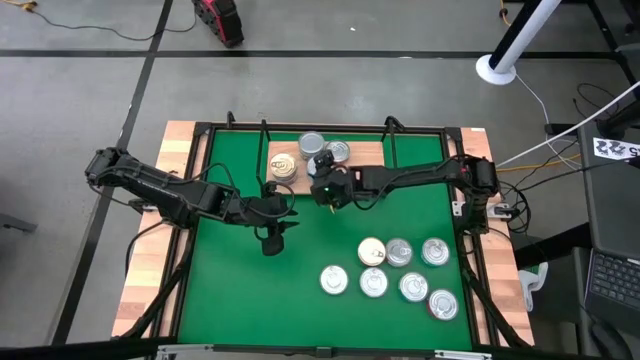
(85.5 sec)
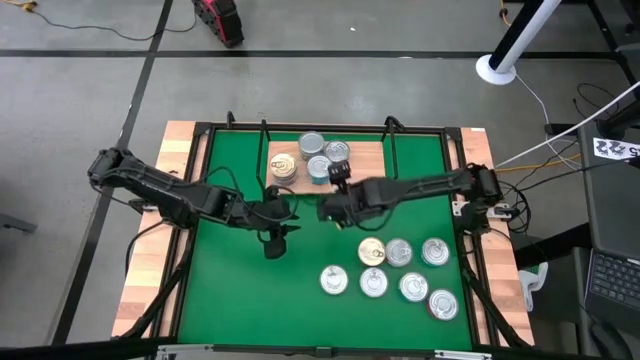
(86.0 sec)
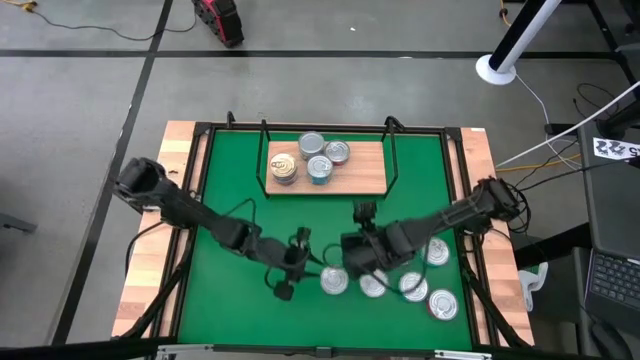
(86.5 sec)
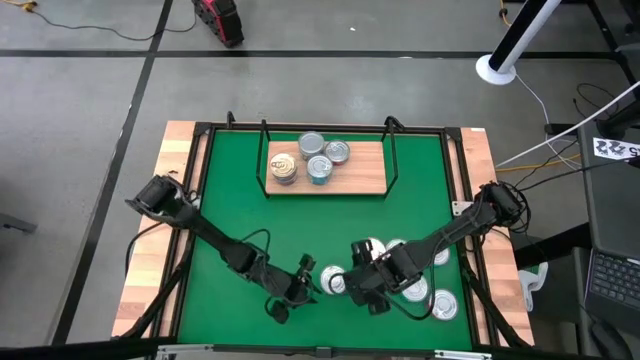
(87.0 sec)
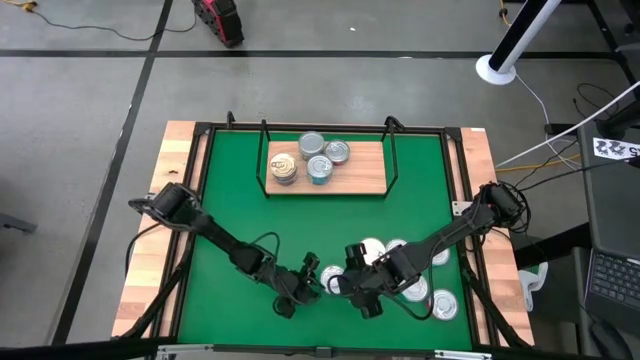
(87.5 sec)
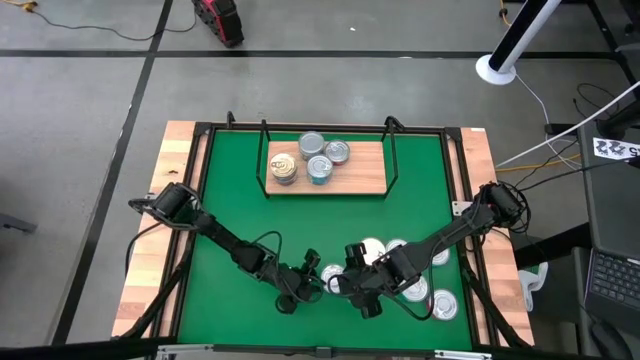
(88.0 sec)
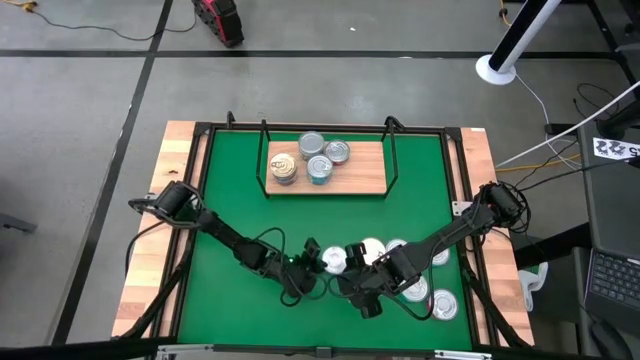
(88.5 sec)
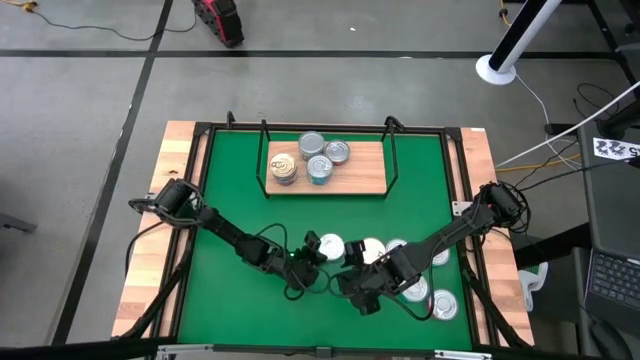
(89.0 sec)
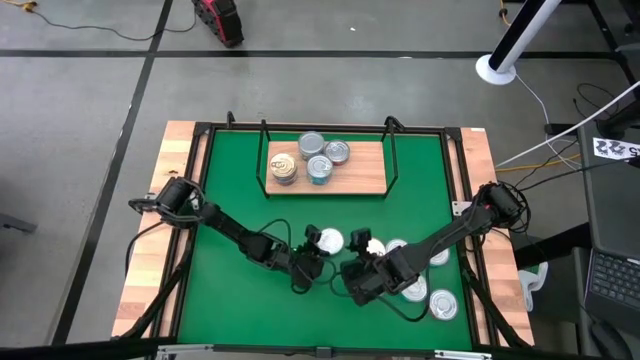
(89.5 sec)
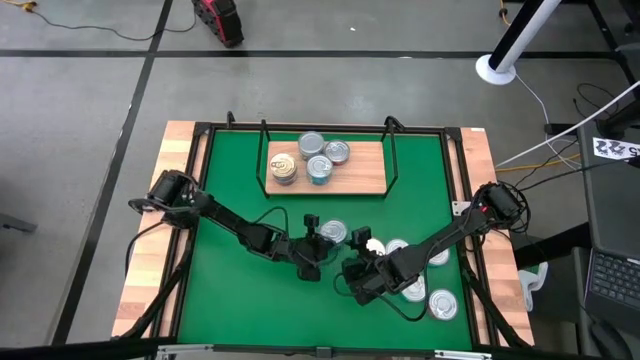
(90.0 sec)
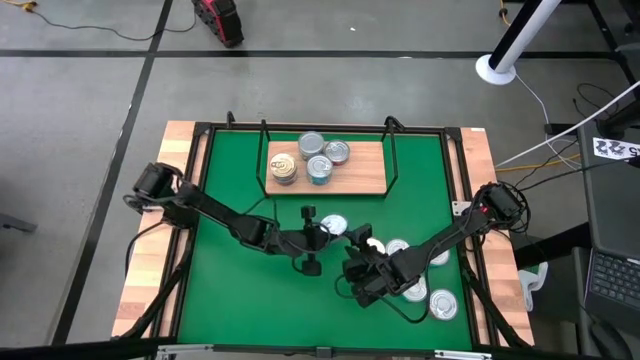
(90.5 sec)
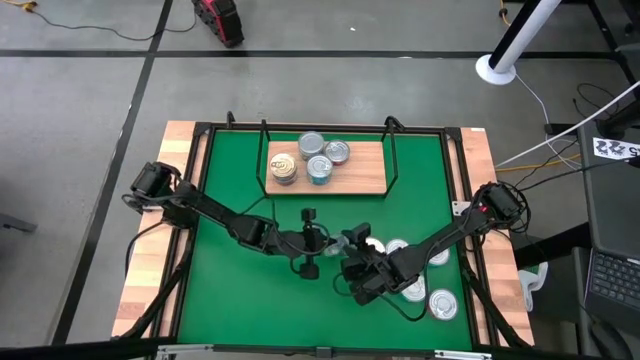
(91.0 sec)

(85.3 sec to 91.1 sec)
Task: Stack canned seafood by type on shelf
Put the green tuna can on the shelf

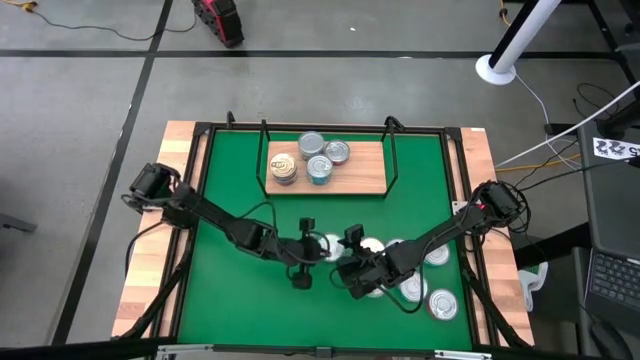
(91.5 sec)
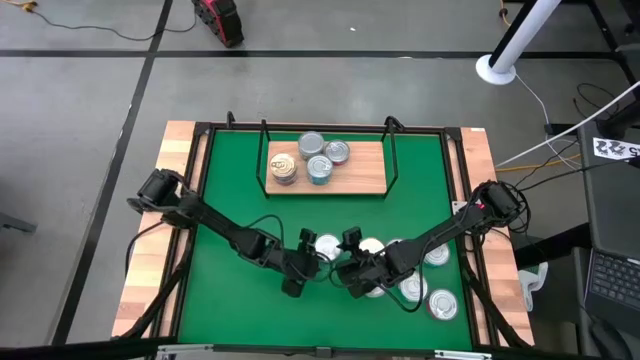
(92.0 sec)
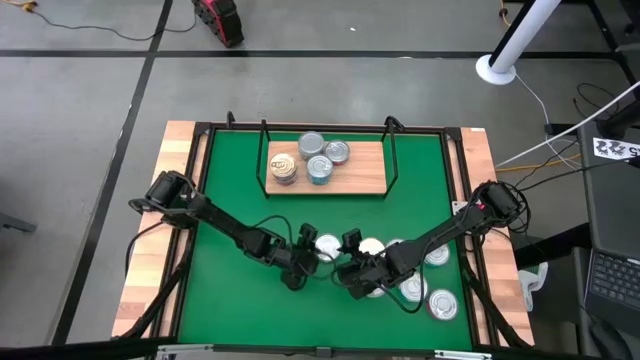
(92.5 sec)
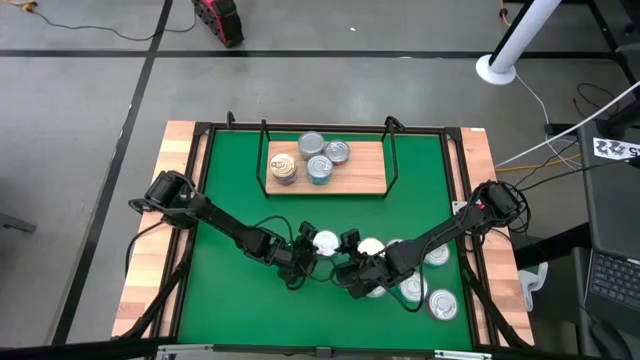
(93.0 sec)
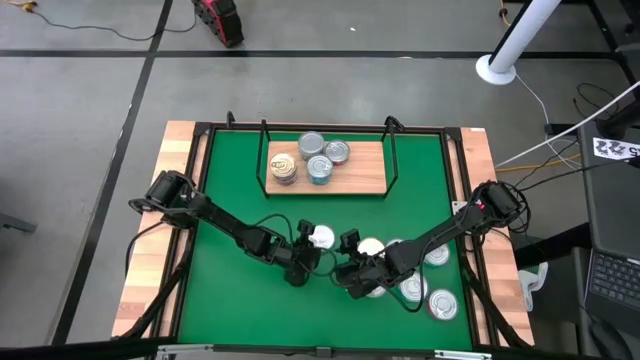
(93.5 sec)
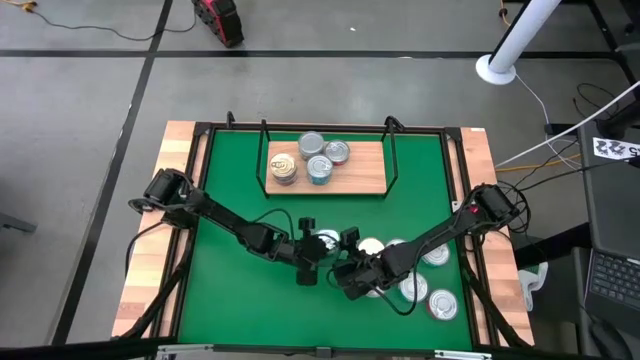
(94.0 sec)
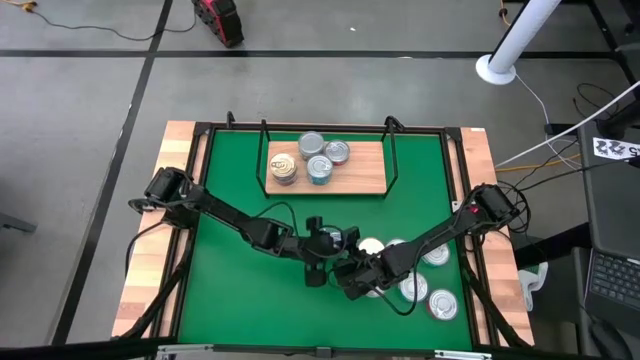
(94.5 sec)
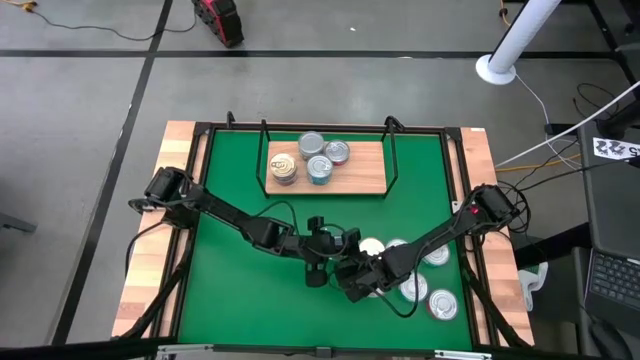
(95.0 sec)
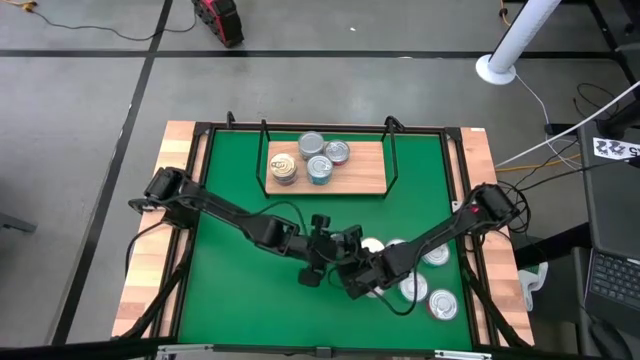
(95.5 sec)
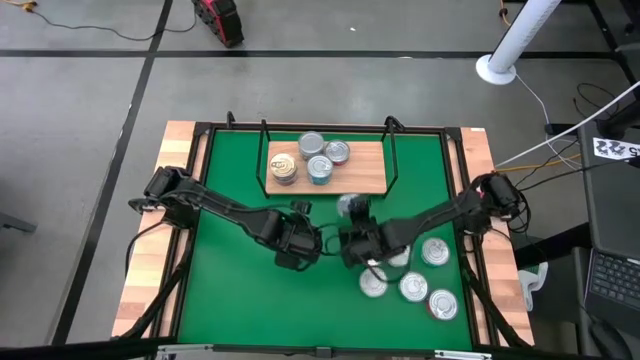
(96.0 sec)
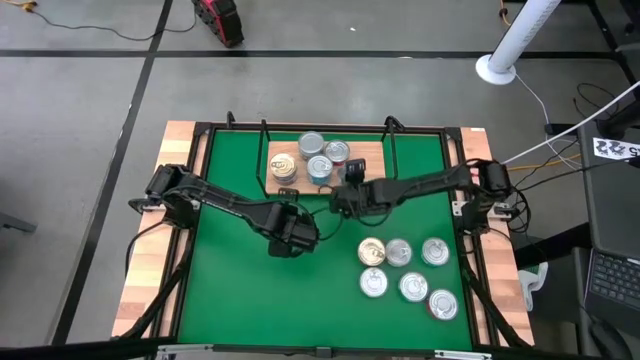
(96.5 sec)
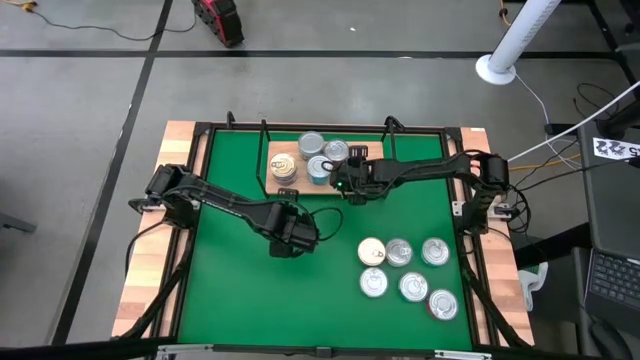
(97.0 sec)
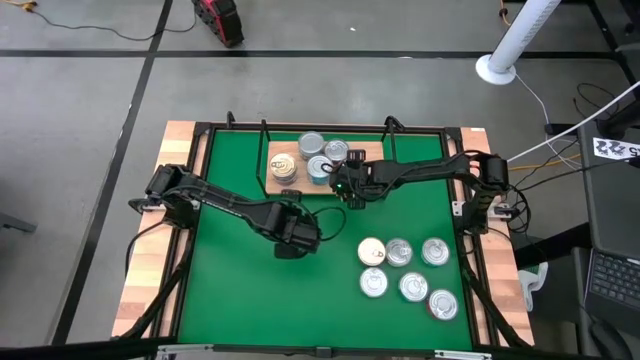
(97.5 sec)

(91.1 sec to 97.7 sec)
Put the green tuna on the shelf

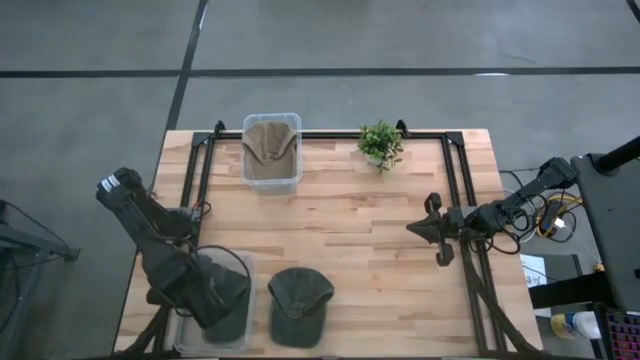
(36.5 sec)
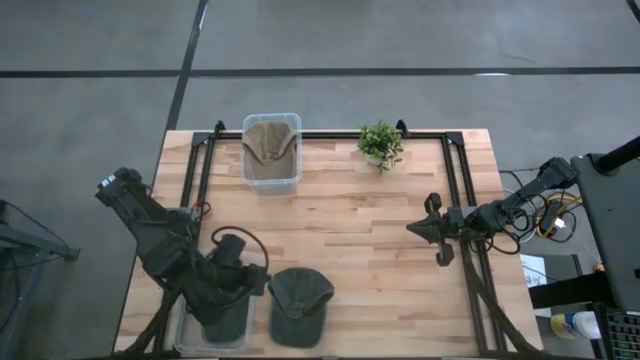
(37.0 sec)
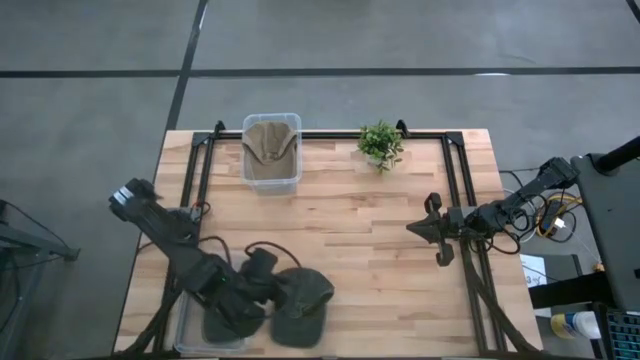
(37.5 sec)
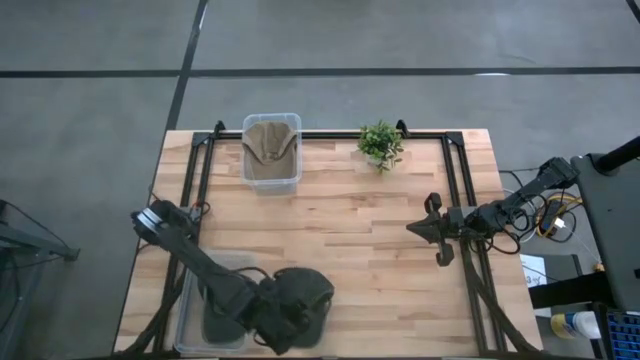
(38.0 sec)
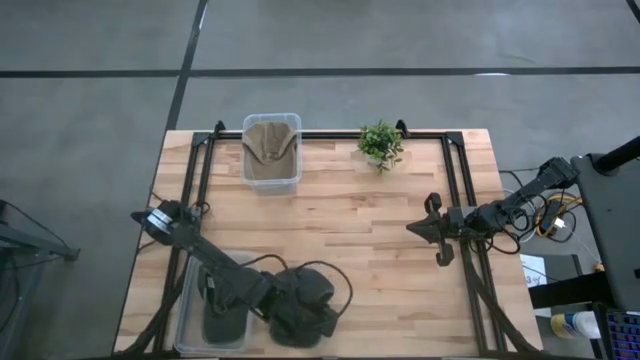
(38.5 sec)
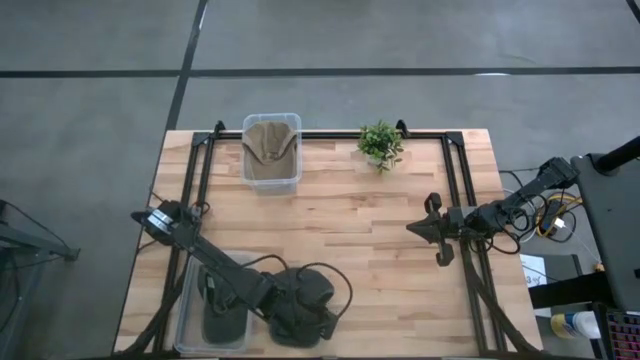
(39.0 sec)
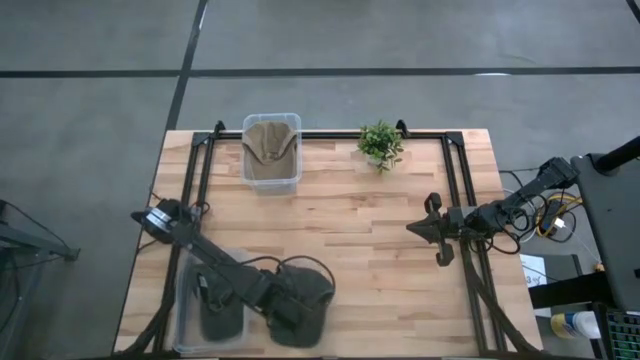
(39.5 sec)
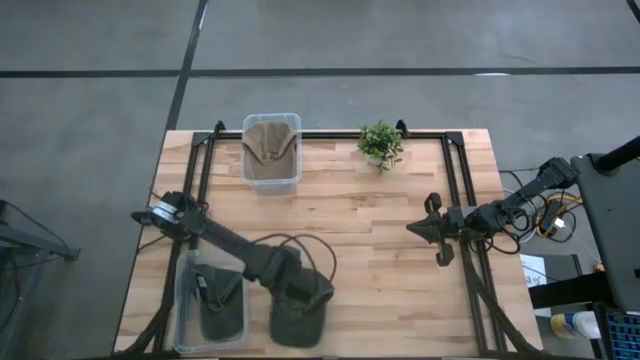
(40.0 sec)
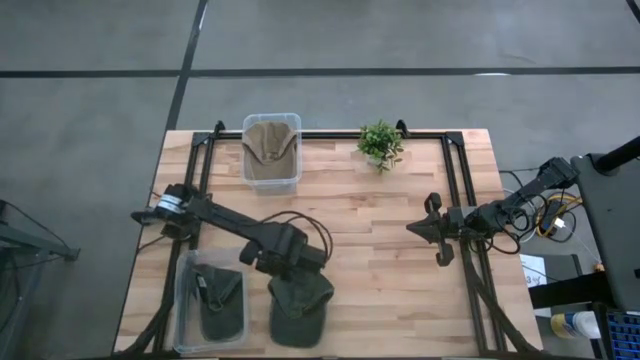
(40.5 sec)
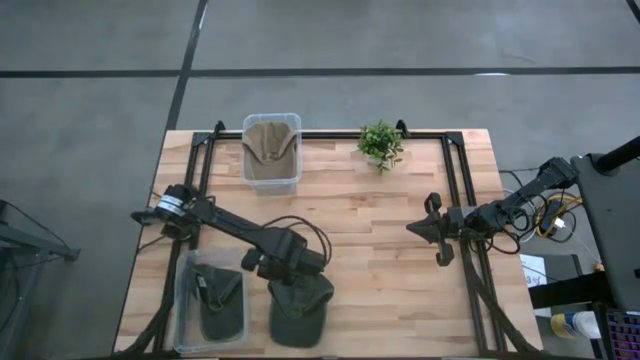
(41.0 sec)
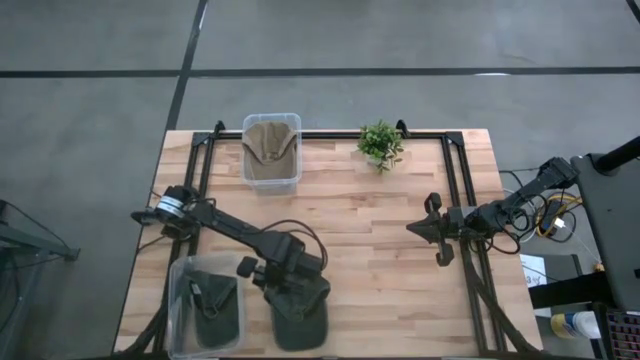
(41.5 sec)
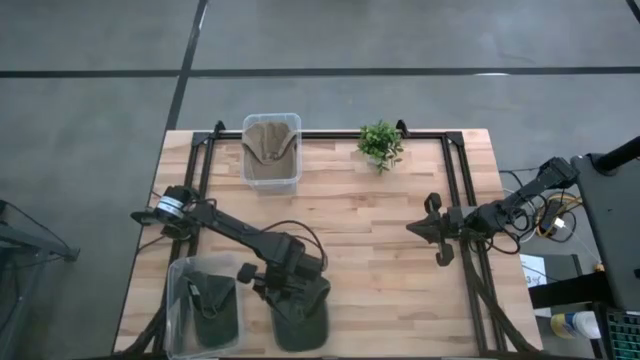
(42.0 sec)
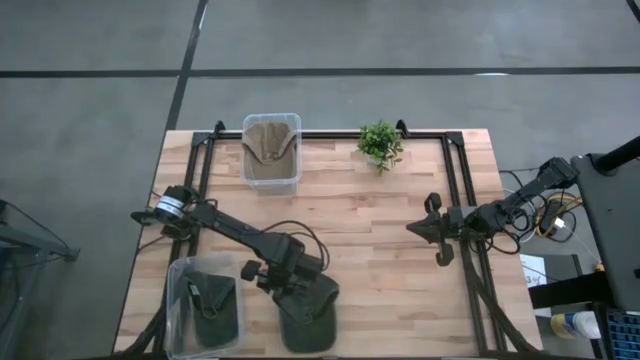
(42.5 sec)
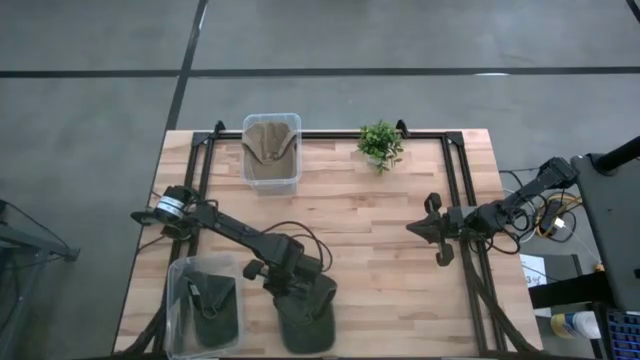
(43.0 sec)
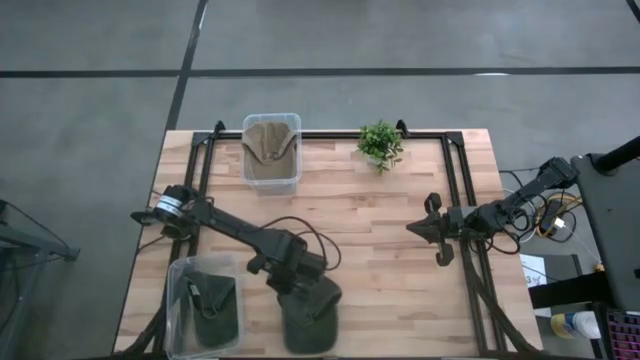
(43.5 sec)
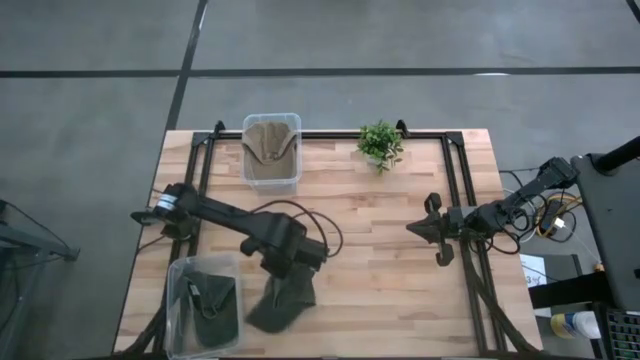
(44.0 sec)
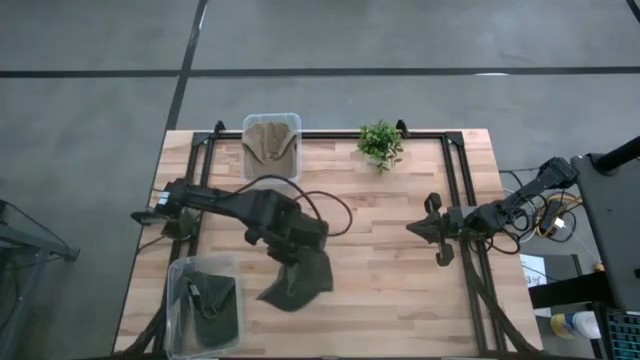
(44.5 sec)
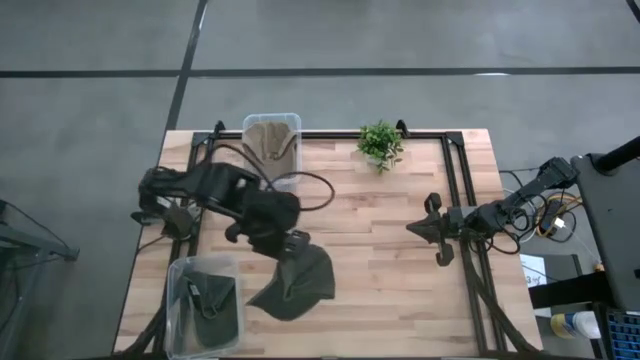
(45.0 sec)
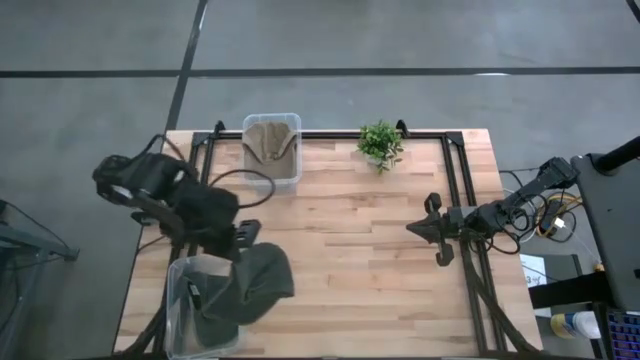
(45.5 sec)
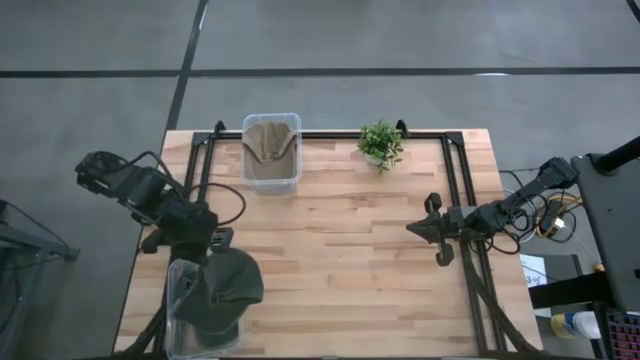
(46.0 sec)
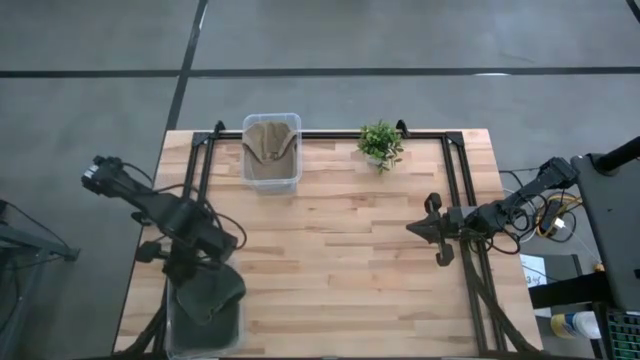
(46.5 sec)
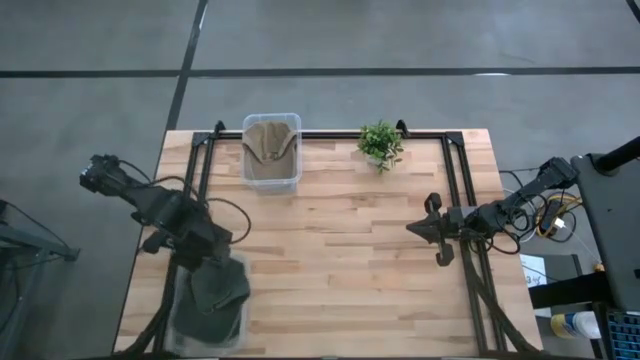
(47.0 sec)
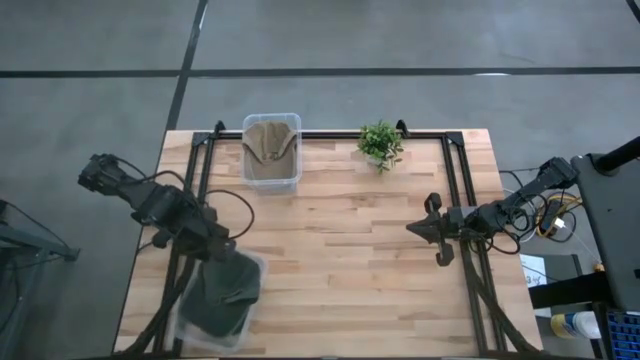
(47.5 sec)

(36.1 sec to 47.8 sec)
Task: Pick & Place hat
Put the black cap into the bottom transparent bin
